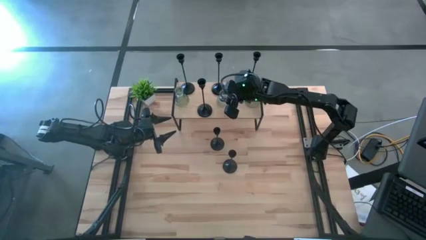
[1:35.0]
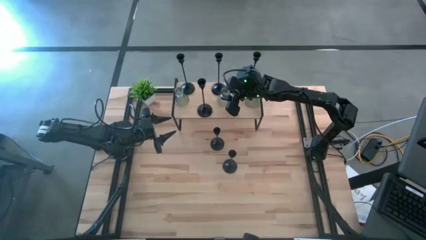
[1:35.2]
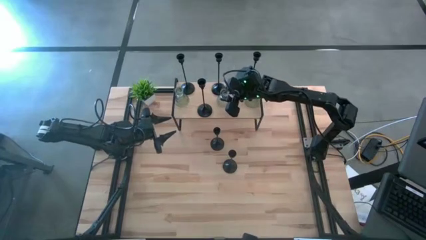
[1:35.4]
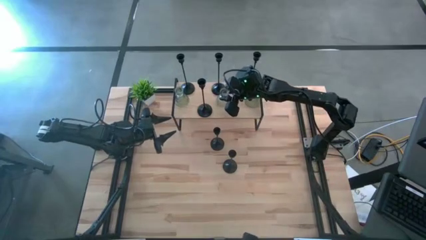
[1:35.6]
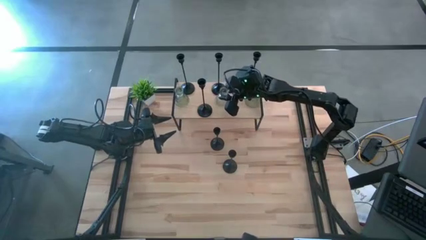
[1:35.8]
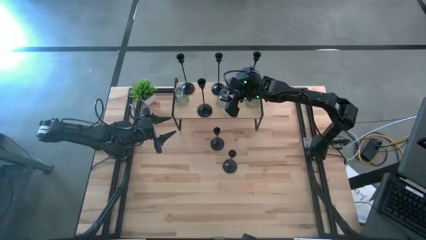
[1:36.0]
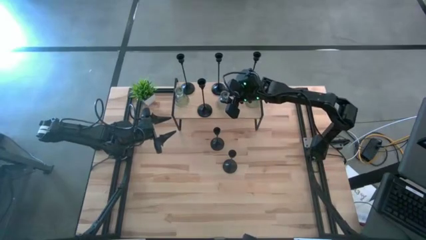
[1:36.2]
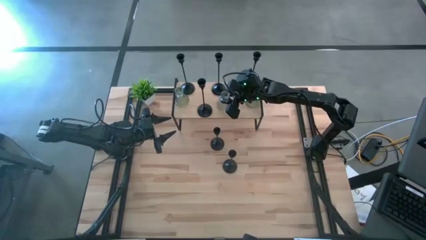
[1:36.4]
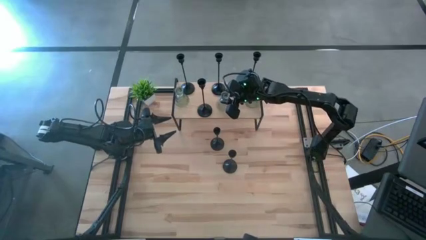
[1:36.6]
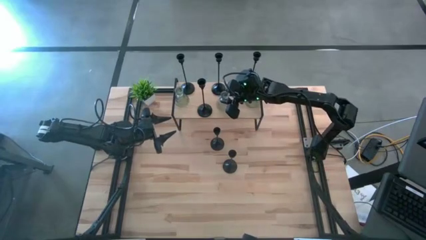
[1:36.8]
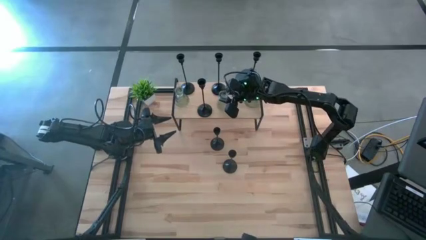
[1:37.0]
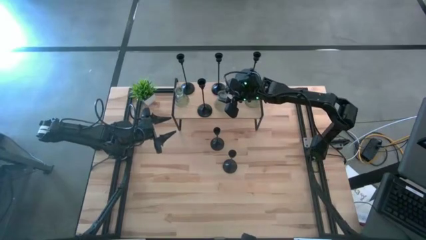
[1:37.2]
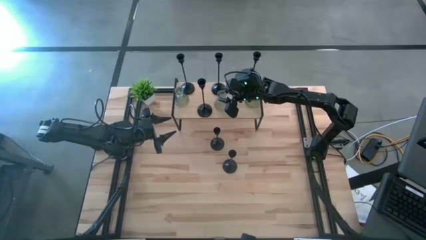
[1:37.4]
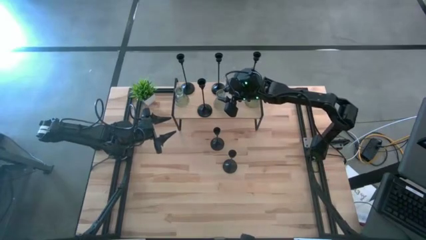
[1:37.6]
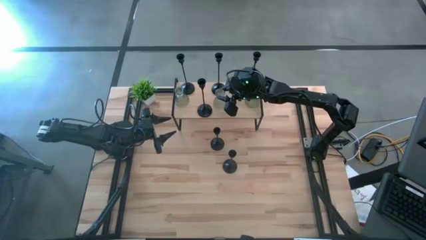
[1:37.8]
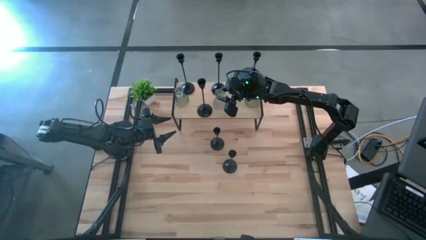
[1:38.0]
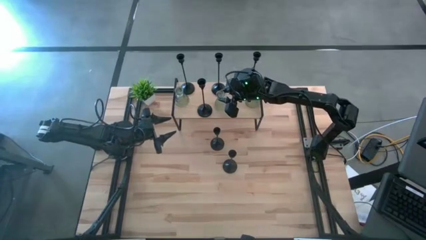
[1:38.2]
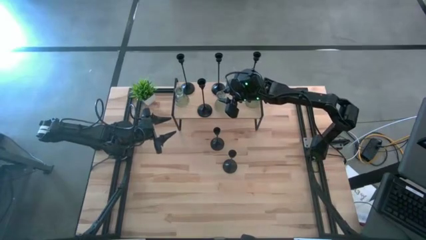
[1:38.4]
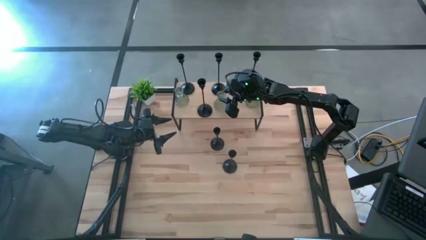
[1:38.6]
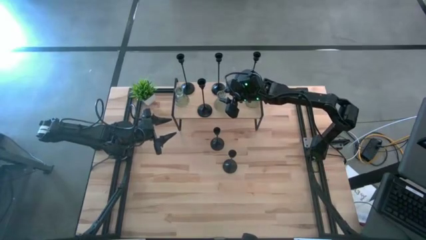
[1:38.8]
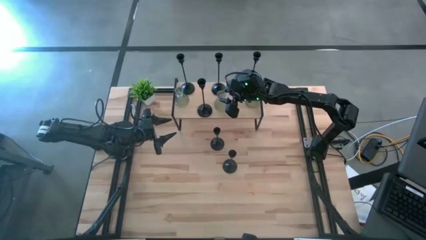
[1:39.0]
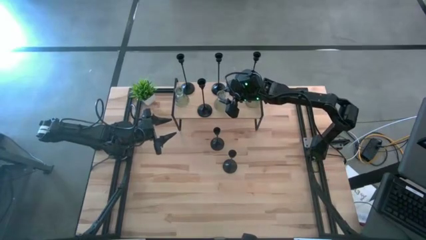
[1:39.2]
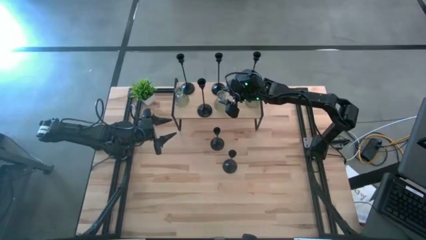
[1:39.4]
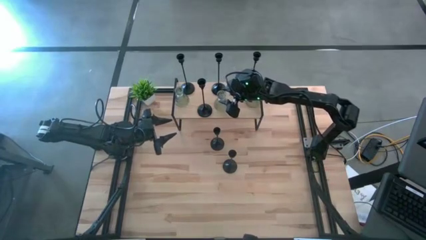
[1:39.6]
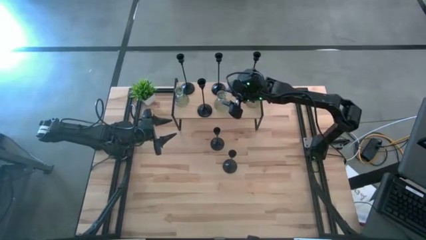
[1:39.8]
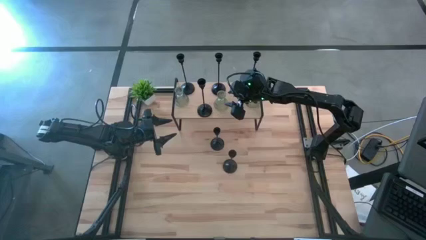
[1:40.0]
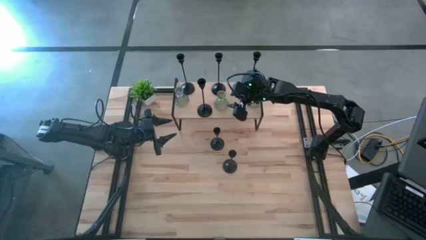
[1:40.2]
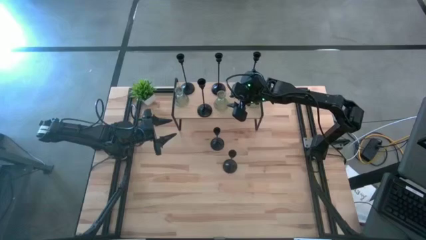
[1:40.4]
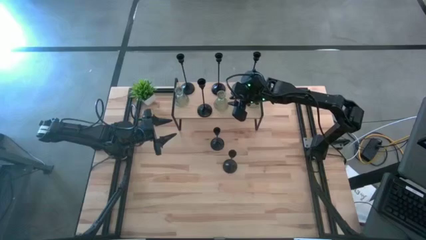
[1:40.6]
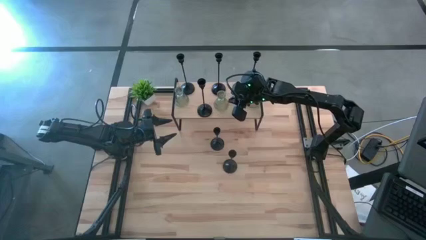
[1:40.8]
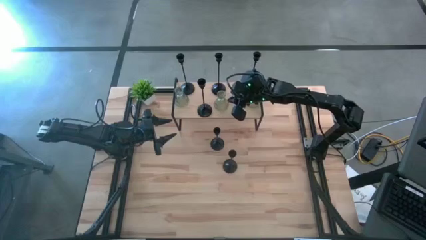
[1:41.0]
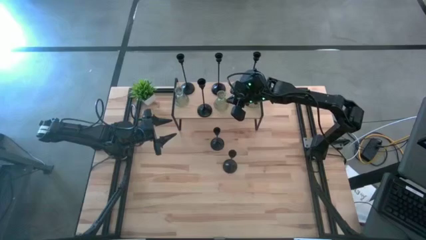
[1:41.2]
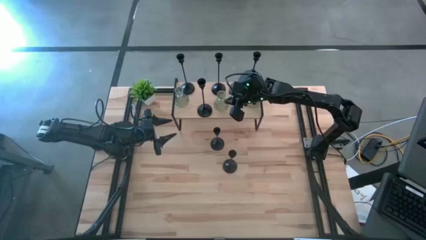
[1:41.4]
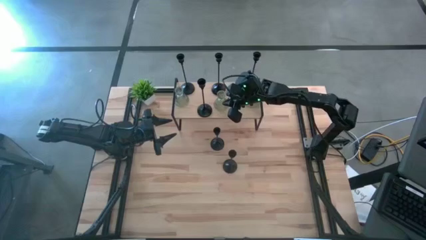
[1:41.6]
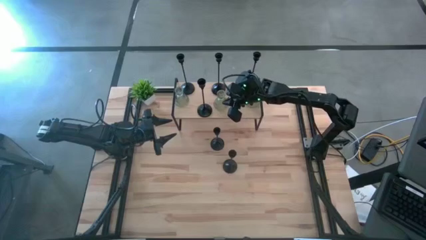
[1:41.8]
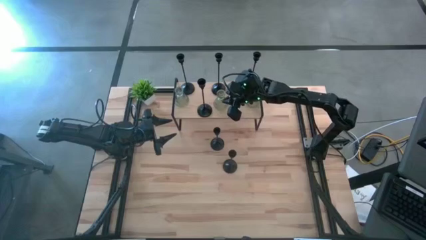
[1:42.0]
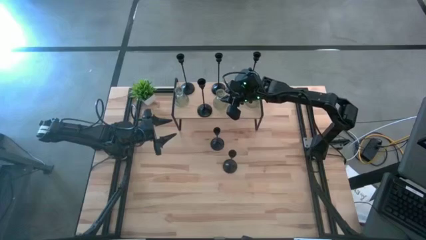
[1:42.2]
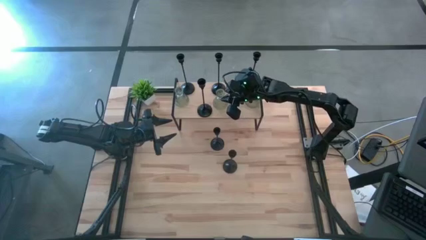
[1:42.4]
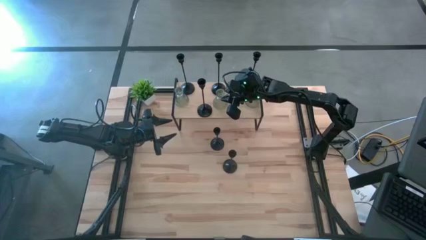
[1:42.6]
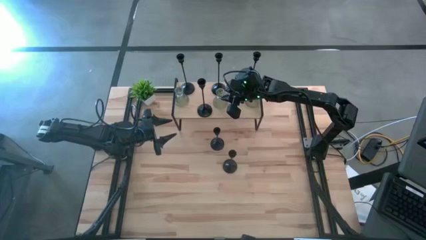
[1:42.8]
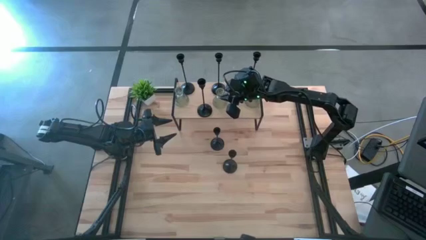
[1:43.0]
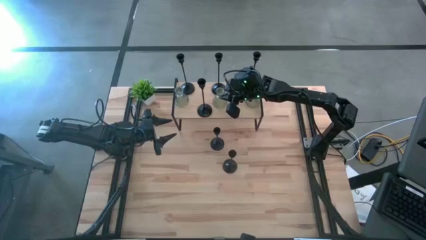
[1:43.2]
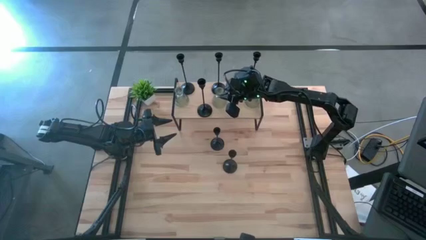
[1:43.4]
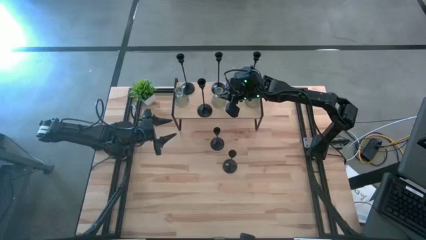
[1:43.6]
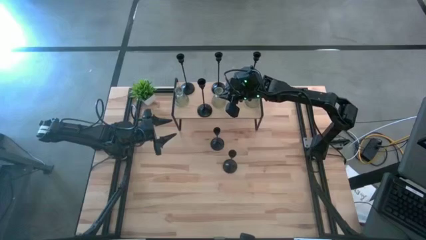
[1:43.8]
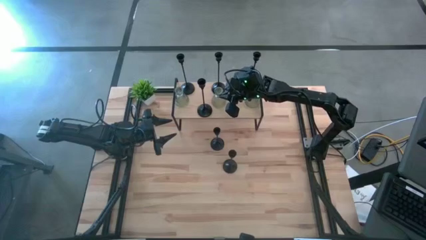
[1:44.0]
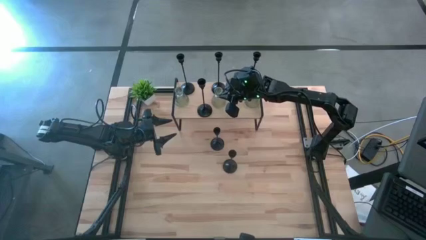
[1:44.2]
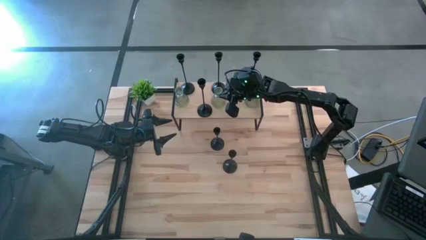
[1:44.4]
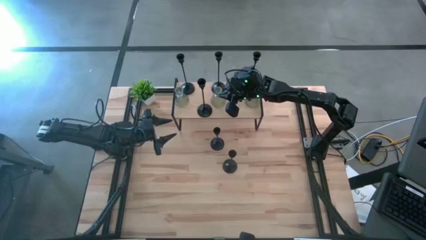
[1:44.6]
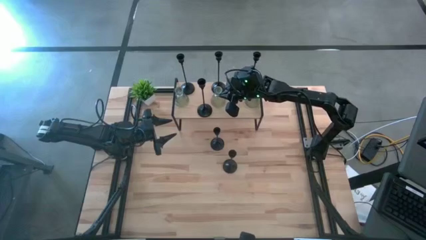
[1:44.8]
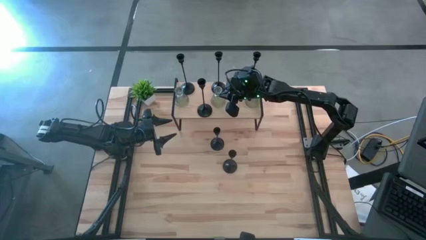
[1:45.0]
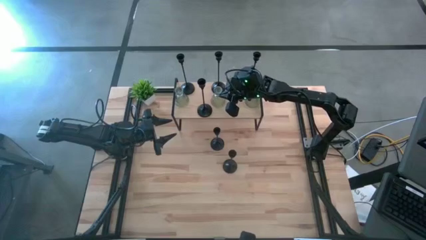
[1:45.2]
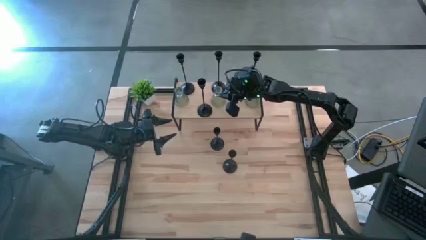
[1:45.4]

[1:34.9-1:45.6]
Task: Pick & Place candle stick holders
Put the green candle holder on the shelf

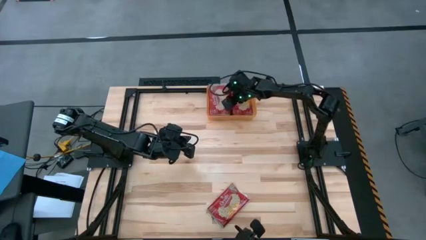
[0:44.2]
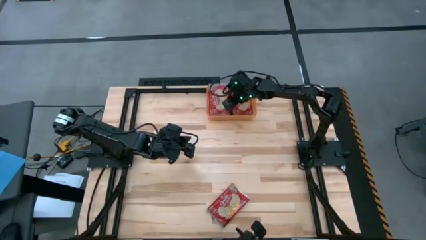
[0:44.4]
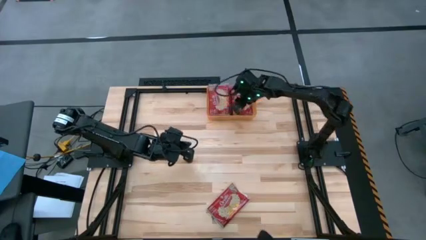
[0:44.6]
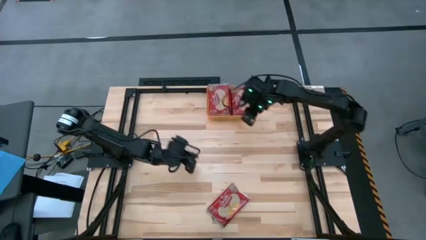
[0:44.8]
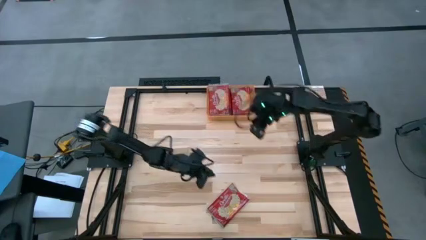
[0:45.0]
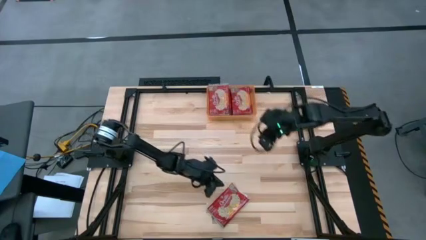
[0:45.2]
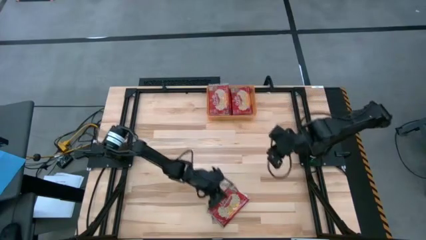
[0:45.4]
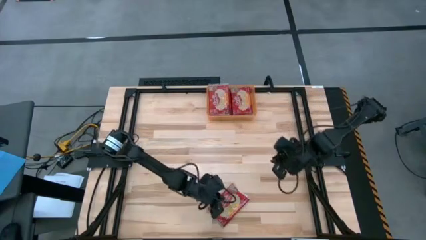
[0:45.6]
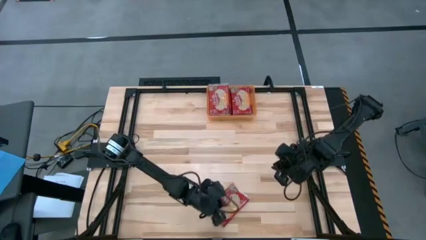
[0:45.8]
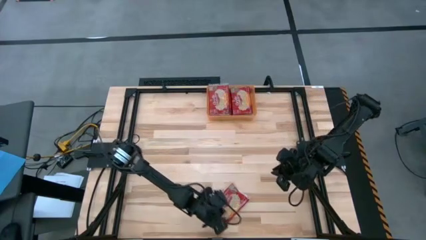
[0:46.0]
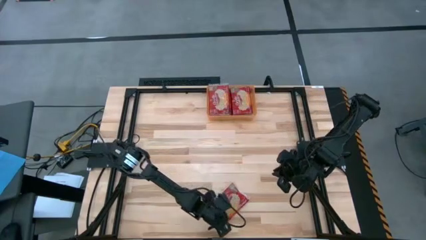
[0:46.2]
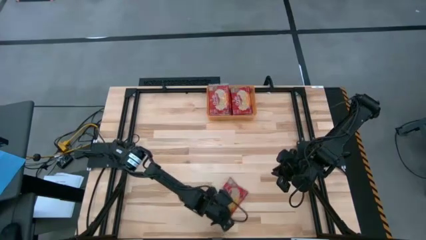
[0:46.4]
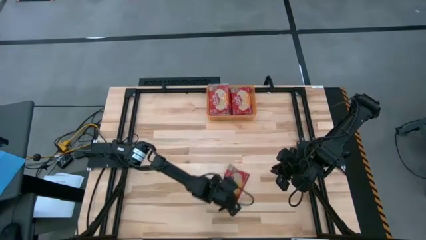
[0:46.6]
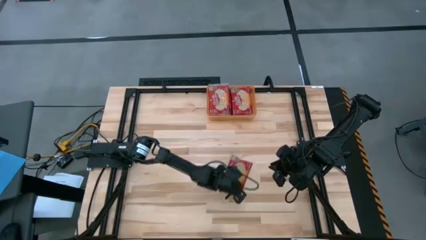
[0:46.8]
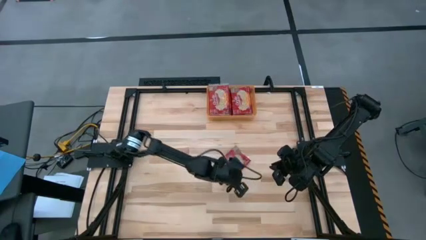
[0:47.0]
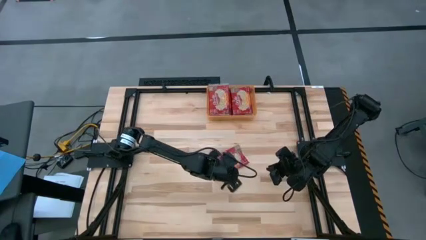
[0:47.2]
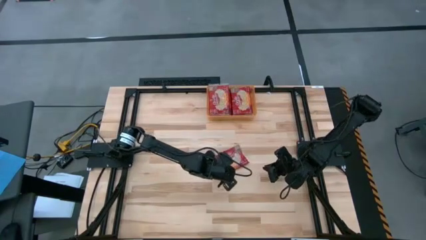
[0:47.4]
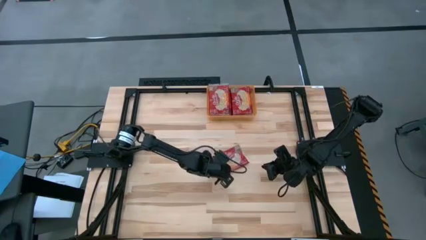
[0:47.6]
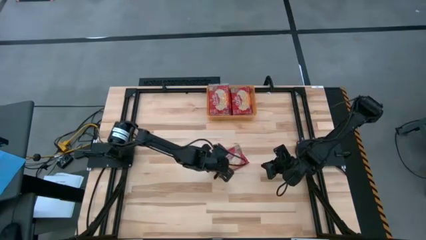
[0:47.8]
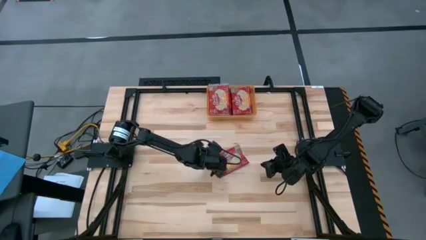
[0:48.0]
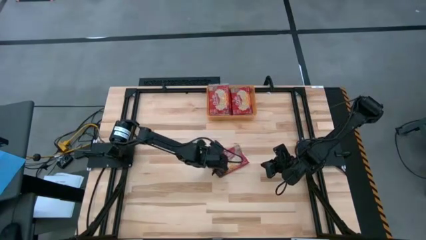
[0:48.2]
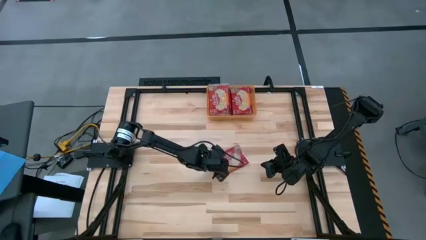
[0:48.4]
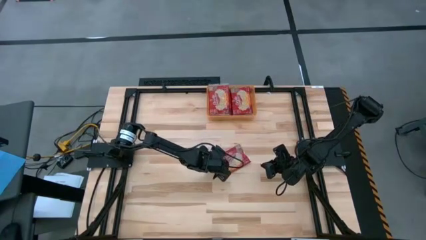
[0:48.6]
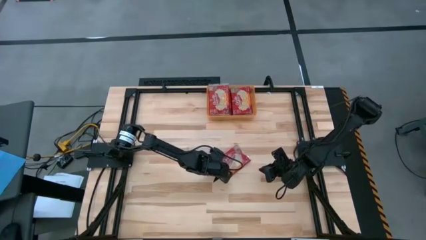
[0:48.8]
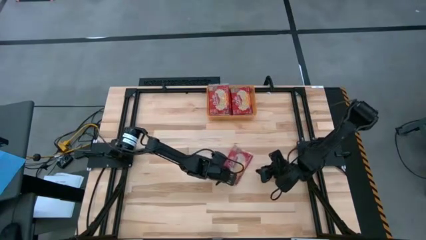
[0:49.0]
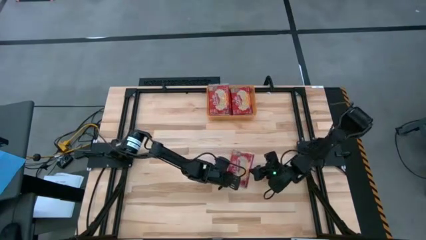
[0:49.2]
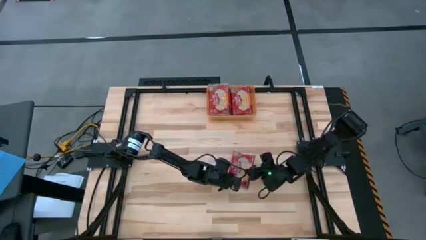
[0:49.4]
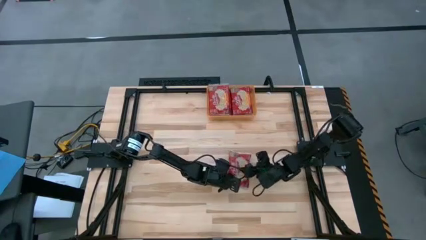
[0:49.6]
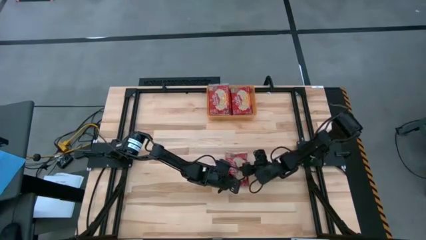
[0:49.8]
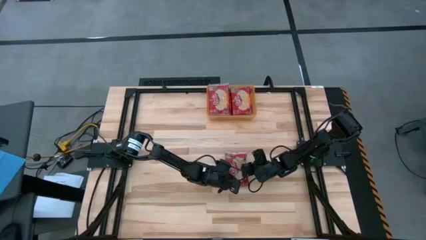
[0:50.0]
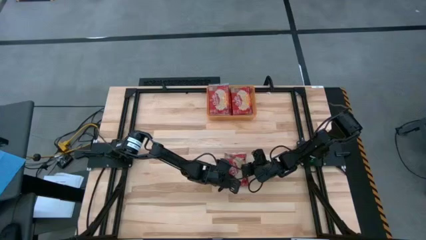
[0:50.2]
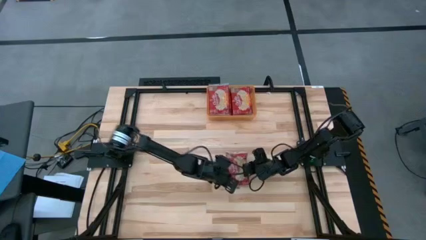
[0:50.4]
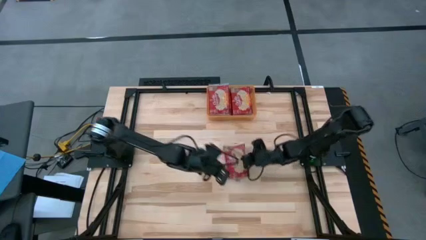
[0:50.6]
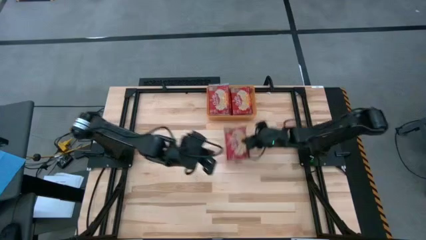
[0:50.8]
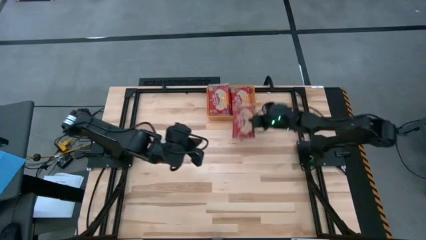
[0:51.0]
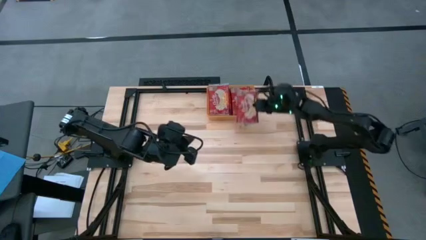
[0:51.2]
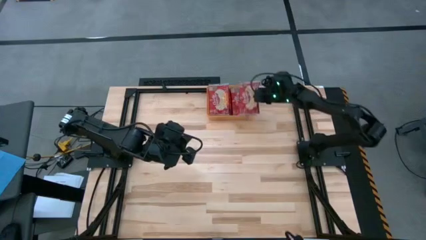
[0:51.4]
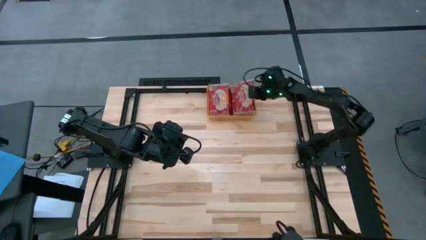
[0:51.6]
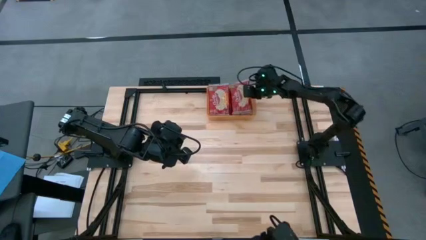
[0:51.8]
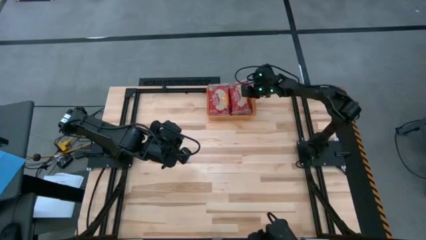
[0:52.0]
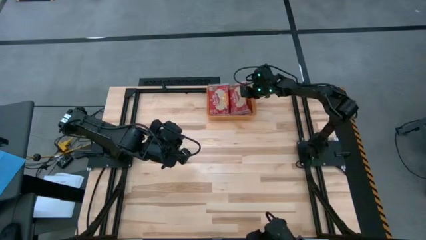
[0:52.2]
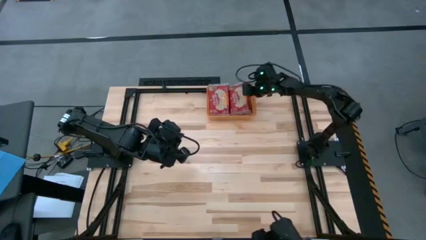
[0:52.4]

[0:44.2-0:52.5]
Task: Sort popcorn bags into baskets
Put the red popcorn bag into the orange bin
